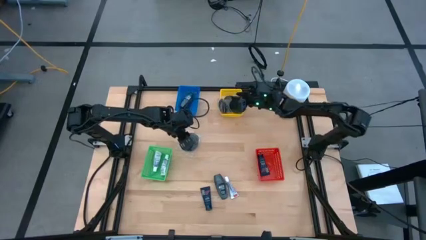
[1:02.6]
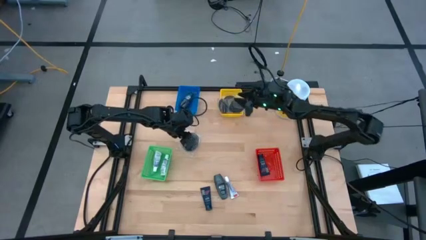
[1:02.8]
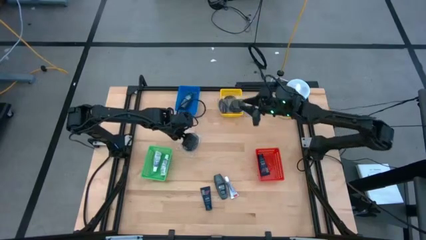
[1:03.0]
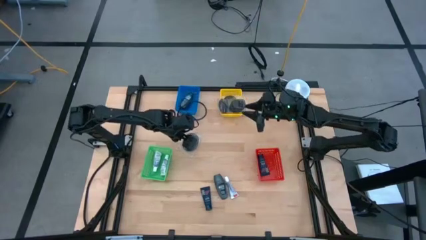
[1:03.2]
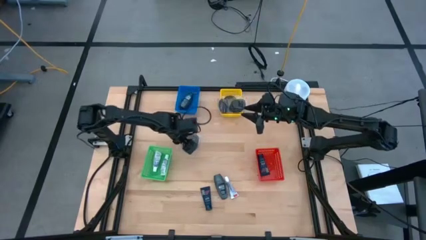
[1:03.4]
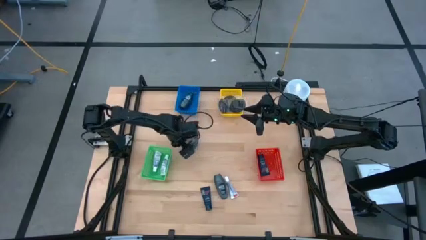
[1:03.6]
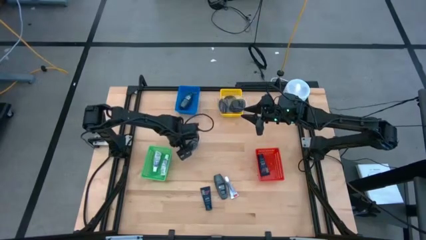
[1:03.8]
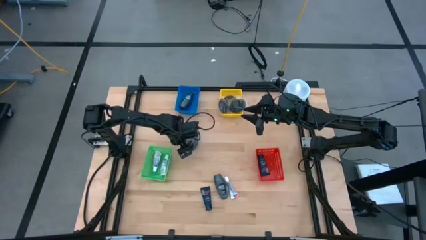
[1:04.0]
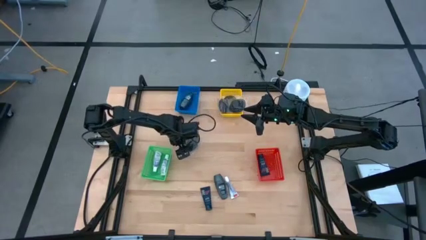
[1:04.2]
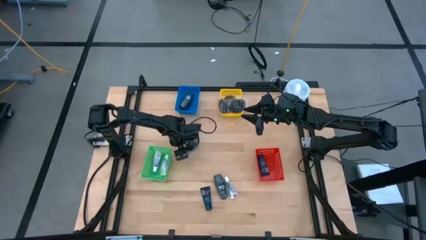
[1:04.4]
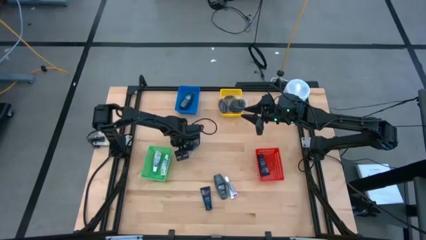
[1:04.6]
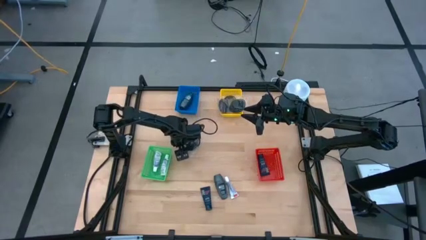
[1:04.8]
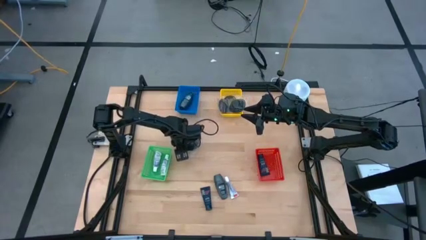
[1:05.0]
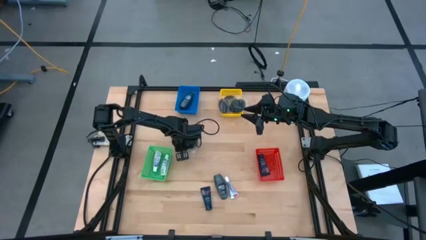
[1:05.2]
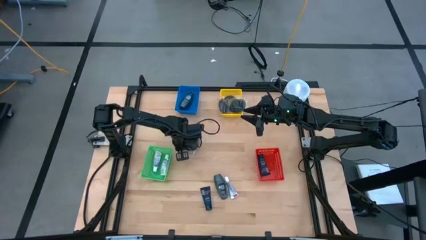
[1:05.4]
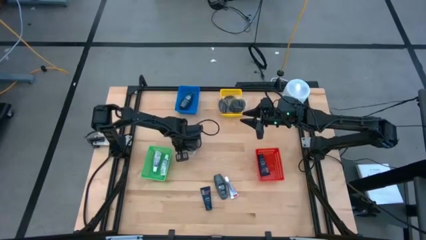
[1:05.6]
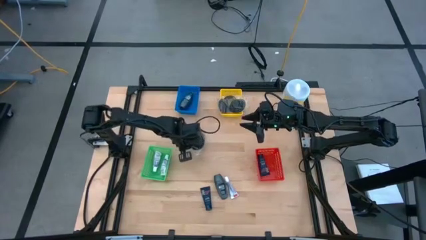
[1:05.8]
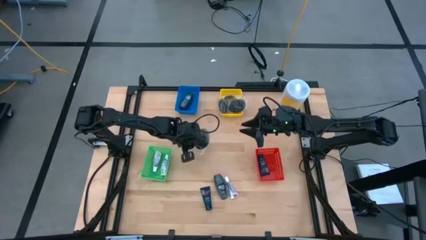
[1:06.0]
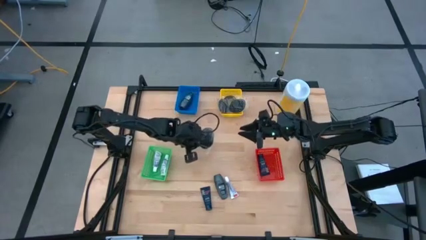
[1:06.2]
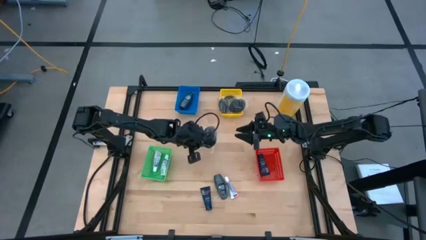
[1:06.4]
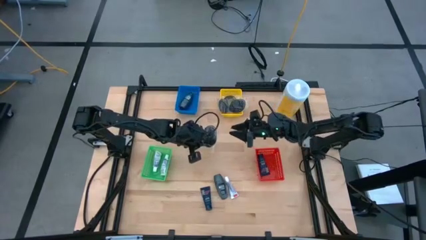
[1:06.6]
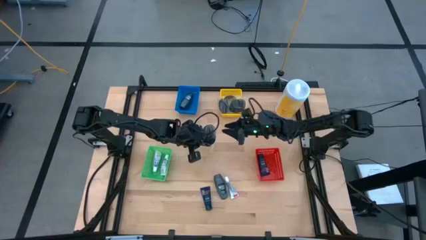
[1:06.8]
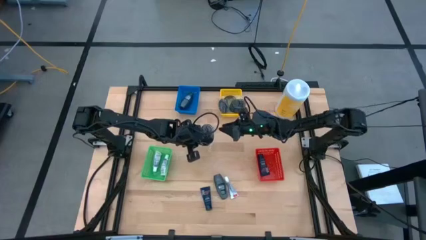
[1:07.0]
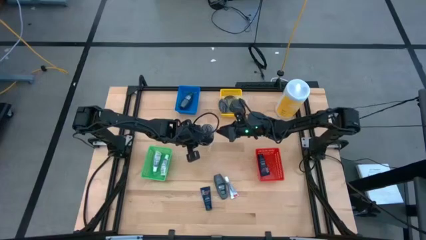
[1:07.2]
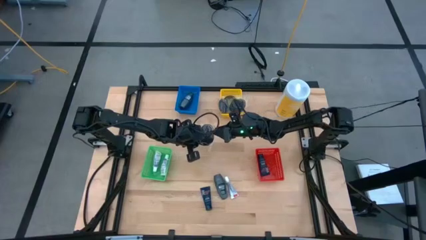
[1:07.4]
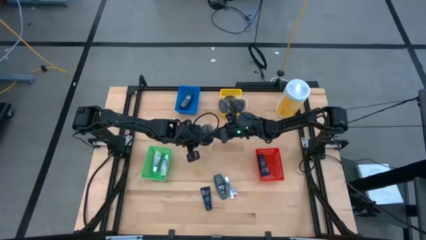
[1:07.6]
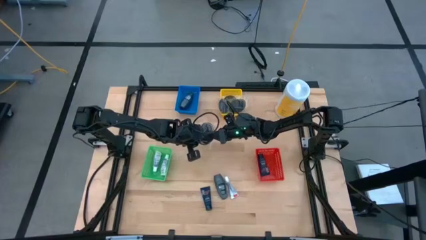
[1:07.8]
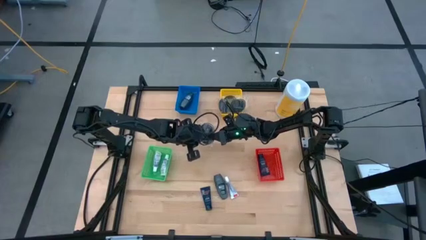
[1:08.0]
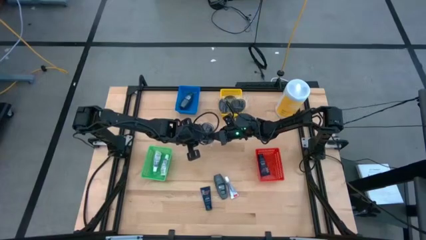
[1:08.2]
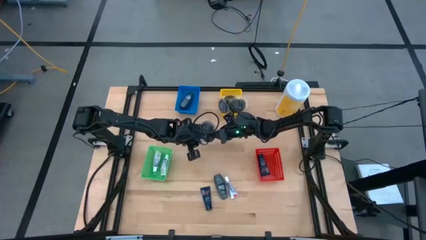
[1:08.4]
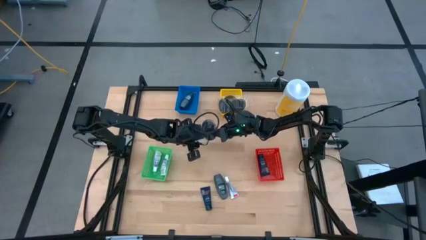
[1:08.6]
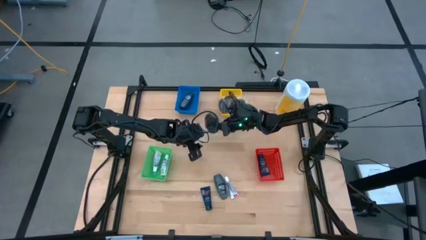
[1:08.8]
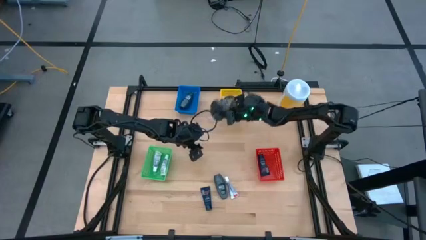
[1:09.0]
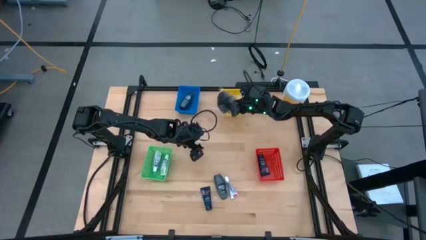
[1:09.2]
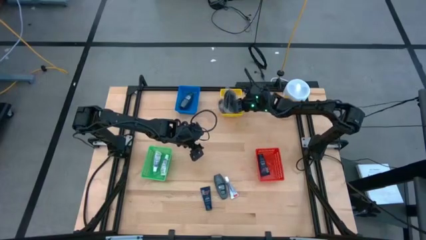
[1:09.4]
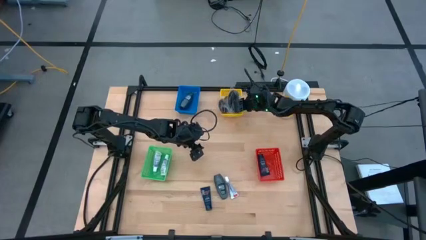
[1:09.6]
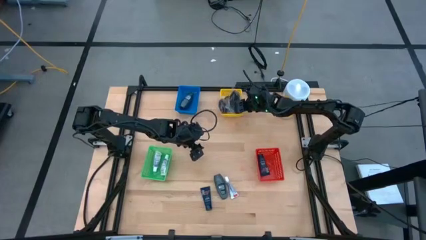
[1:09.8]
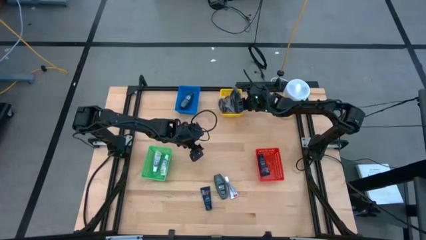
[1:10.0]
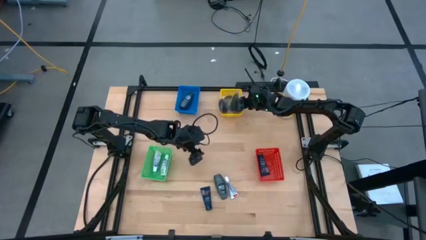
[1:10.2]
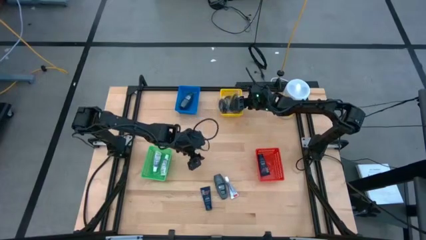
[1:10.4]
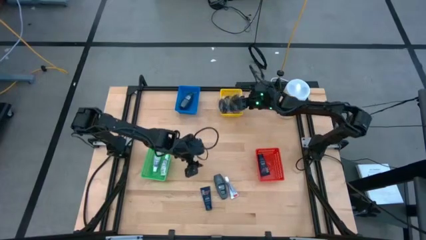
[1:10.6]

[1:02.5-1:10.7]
Task: Pick & Place Travel size toiletries
Put the black hairbrush into the yellow bin

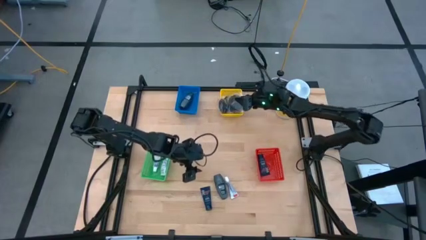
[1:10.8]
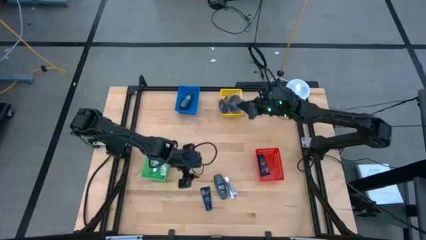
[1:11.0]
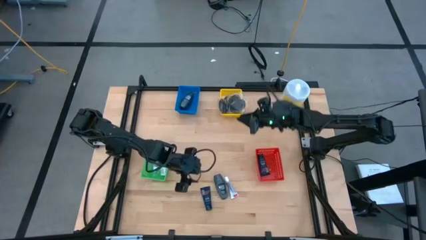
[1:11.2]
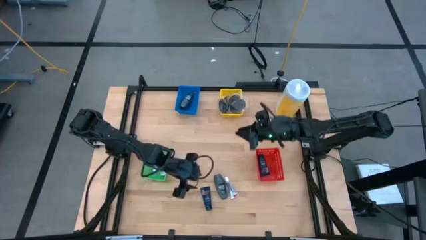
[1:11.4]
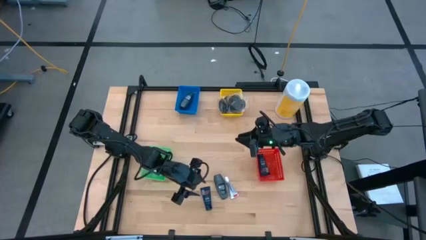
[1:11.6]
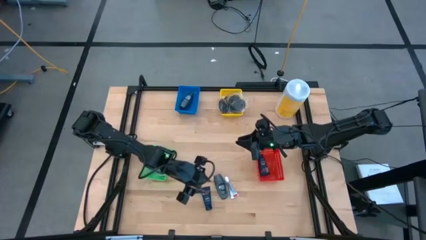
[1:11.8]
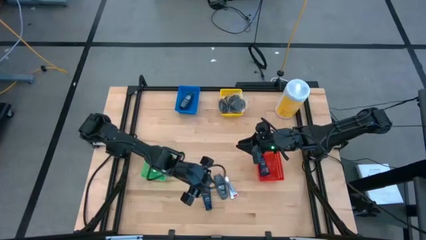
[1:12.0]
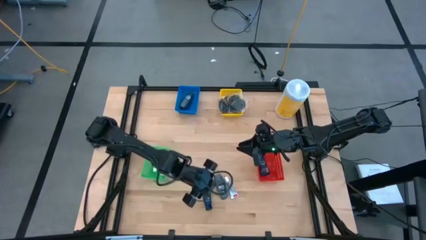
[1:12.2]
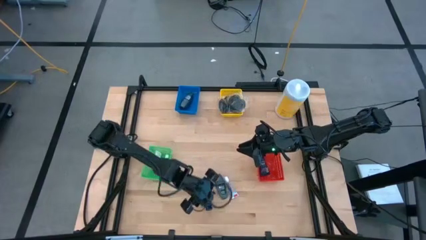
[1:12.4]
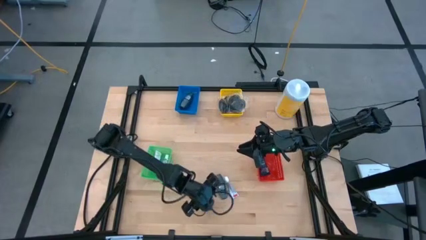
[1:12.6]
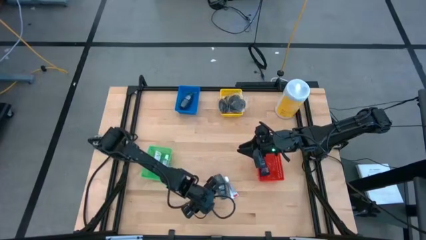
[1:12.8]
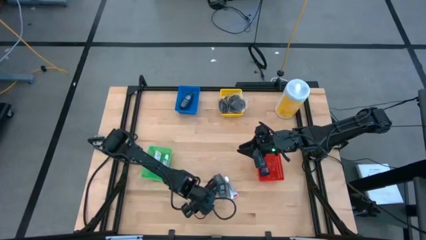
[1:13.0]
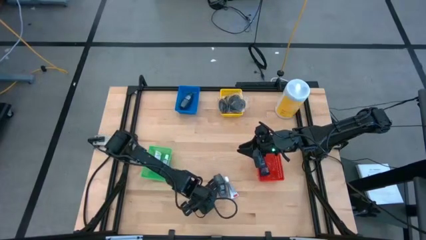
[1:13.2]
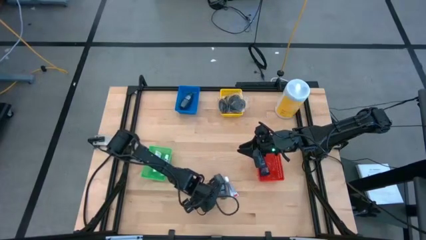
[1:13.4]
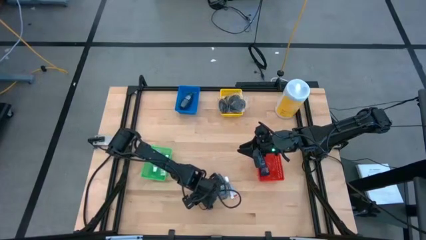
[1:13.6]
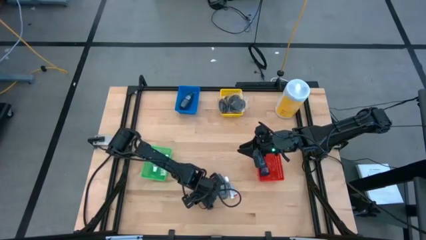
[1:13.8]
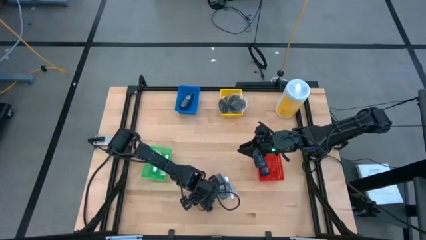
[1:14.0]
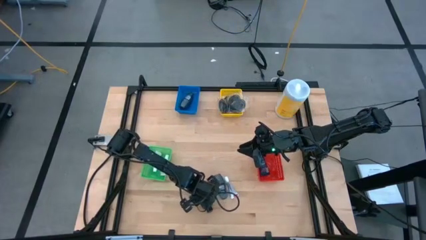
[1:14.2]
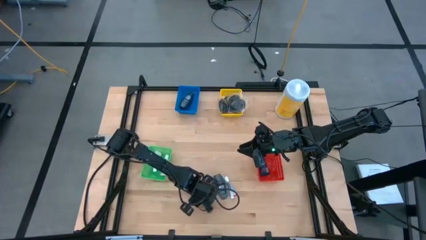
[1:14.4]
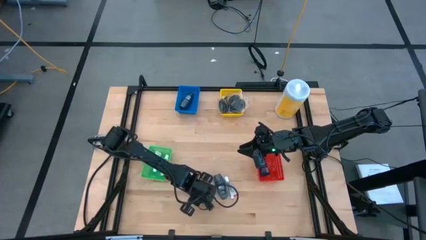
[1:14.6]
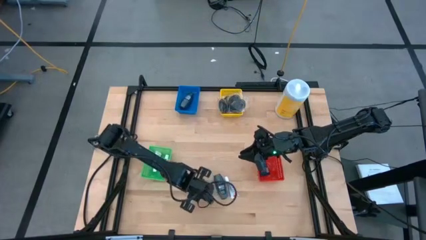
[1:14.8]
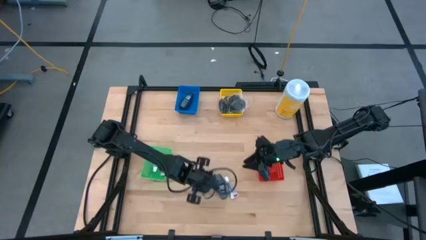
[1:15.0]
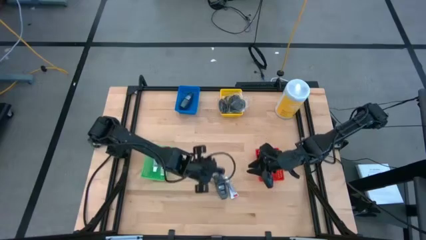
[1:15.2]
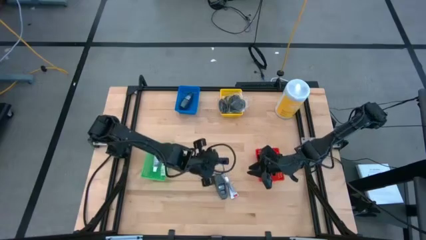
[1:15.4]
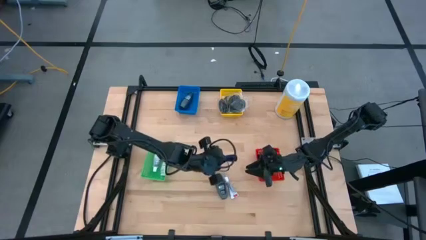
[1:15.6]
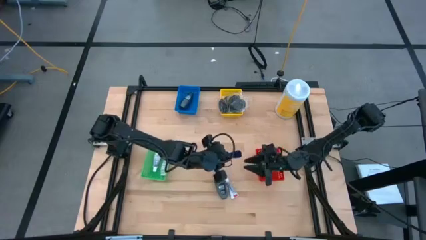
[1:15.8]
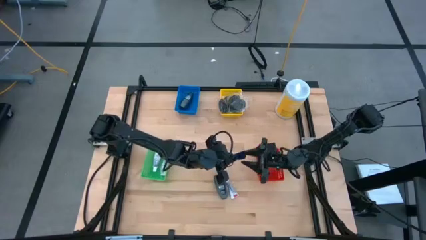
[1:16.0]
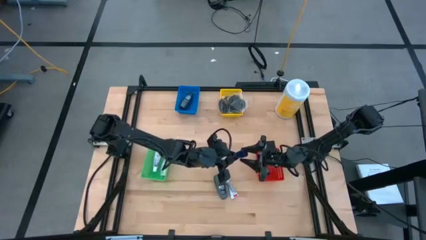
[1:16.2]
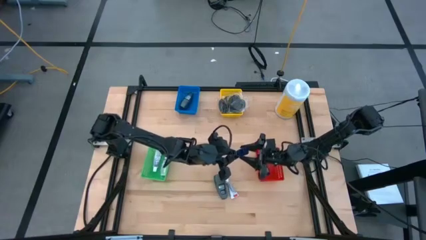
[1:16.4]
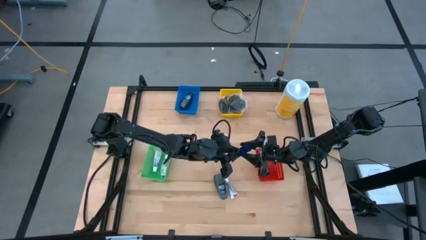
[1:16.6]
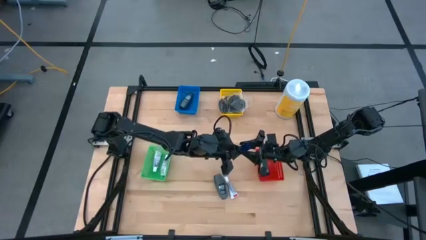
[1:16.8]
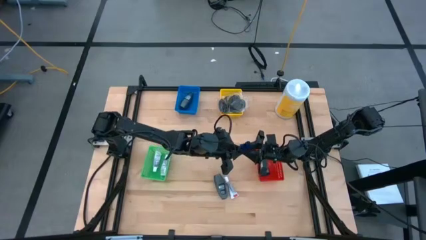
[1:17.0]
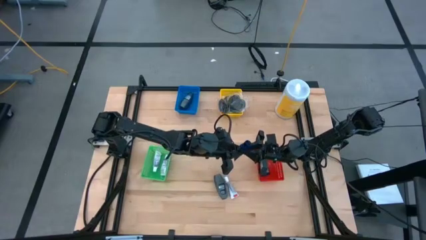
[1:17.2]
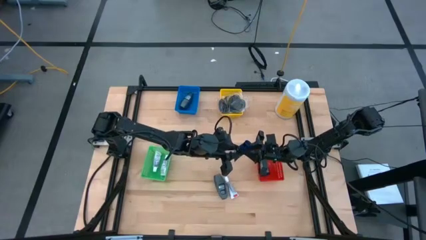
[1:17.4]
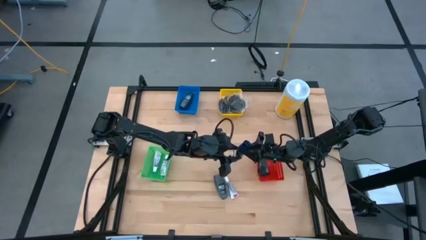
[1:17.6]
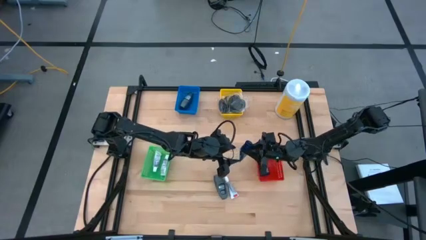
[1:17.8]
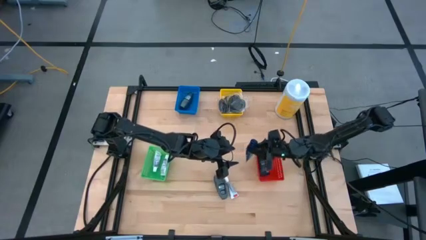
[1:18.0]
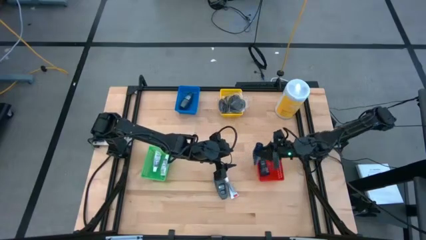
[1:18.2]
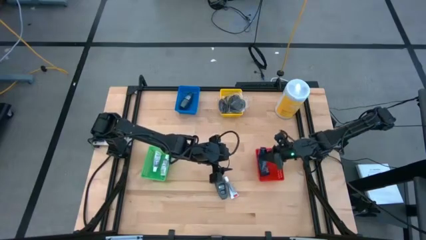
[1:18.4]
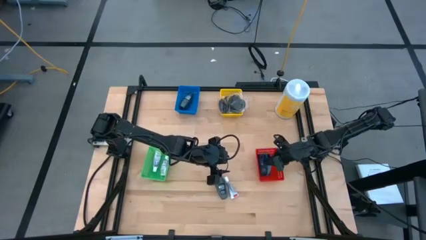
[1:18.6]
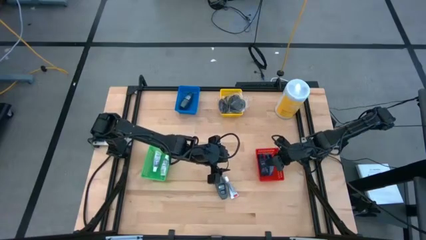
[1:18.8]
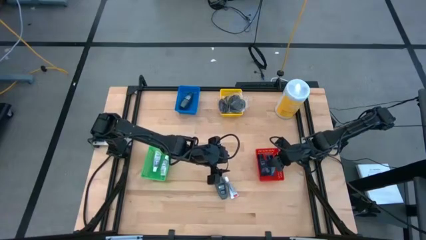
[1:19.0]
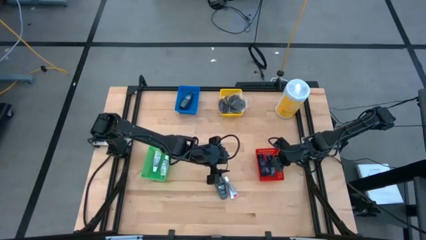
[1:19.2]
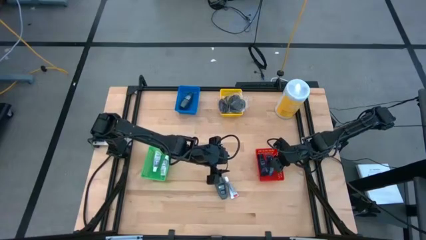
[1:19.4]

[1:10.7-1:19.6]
Put the blue shave cream into the red bin
